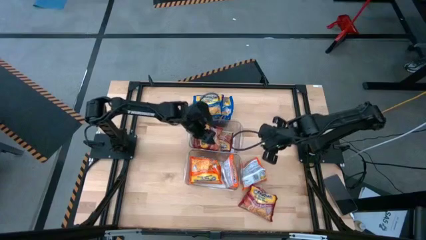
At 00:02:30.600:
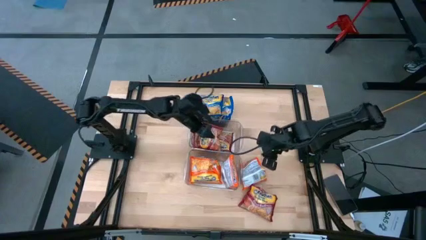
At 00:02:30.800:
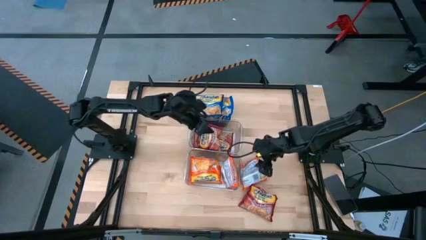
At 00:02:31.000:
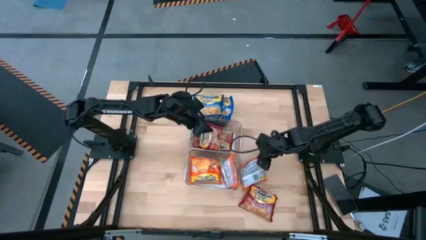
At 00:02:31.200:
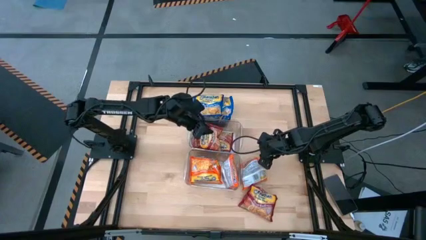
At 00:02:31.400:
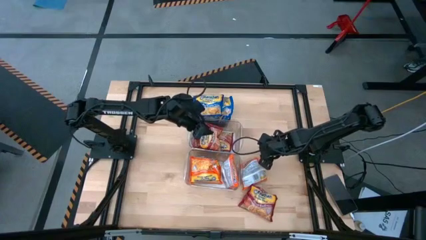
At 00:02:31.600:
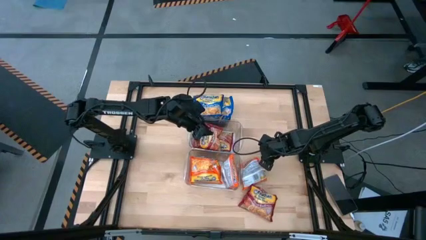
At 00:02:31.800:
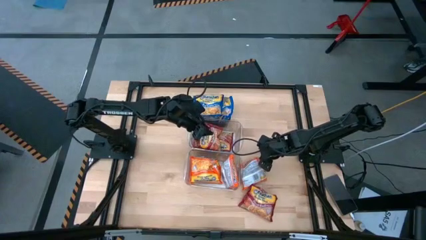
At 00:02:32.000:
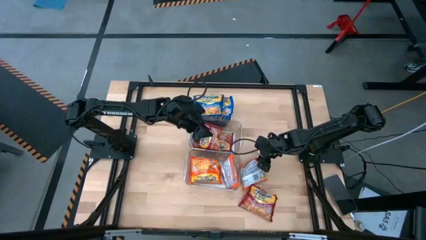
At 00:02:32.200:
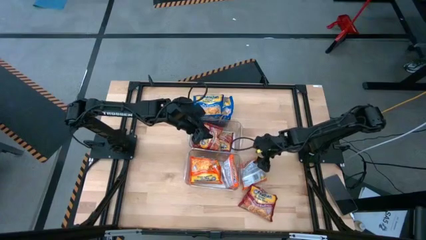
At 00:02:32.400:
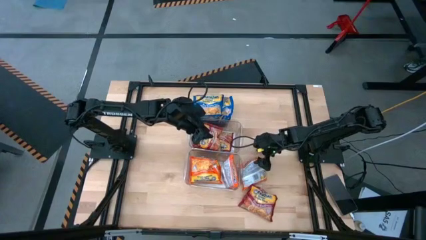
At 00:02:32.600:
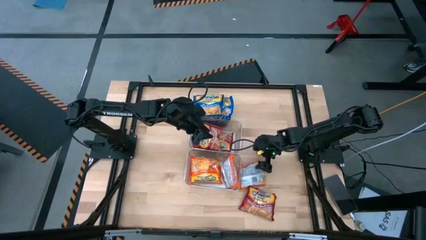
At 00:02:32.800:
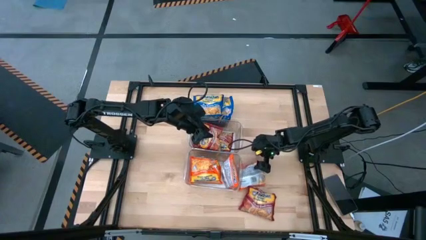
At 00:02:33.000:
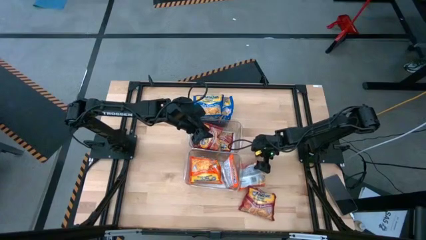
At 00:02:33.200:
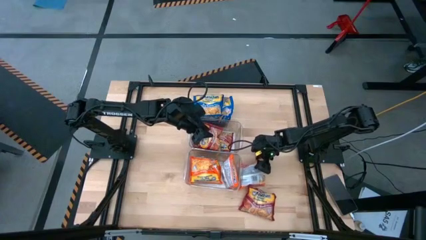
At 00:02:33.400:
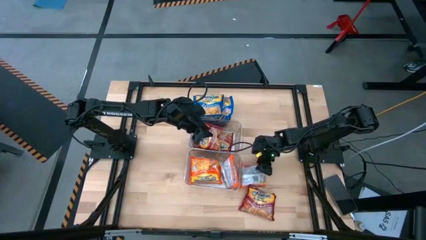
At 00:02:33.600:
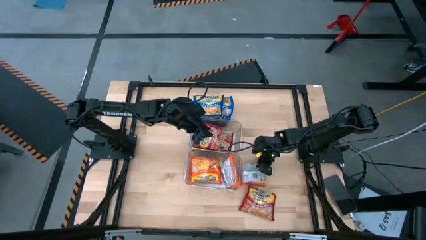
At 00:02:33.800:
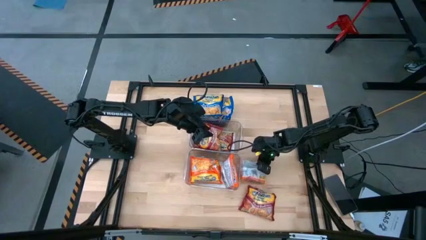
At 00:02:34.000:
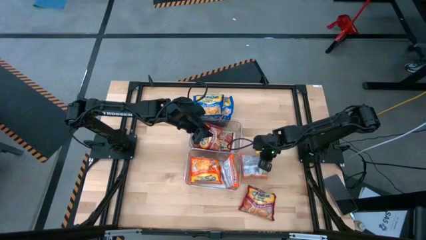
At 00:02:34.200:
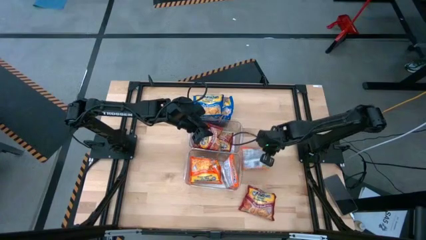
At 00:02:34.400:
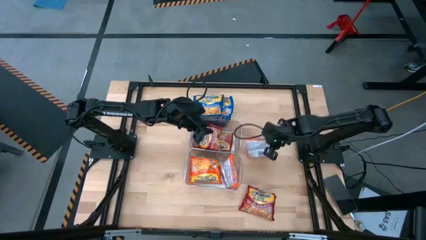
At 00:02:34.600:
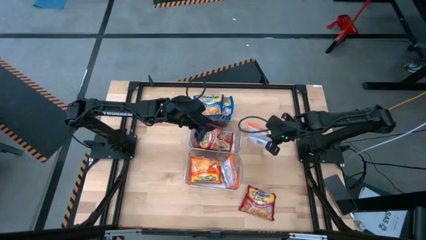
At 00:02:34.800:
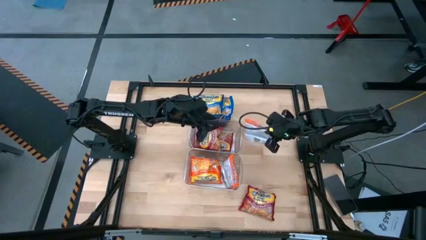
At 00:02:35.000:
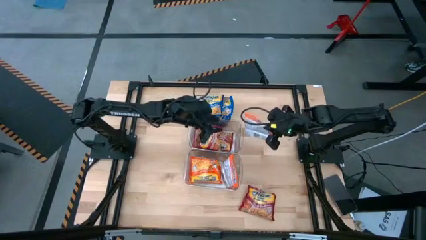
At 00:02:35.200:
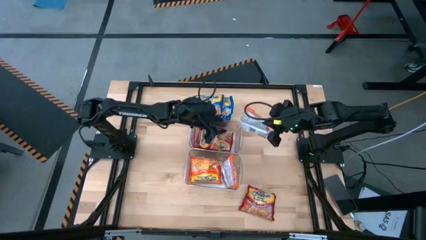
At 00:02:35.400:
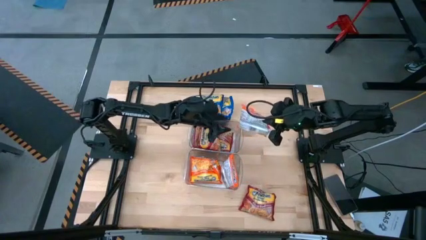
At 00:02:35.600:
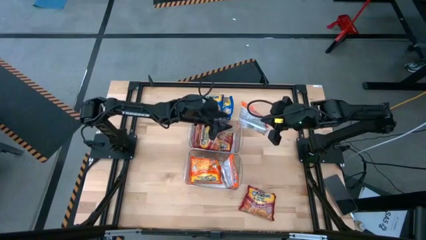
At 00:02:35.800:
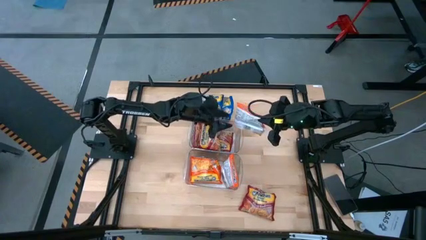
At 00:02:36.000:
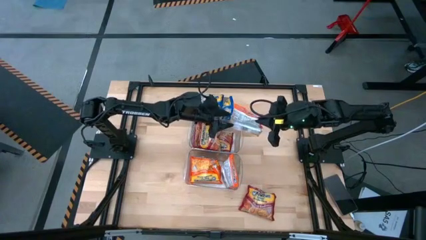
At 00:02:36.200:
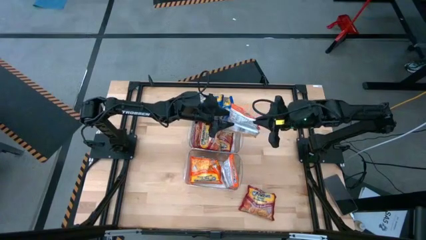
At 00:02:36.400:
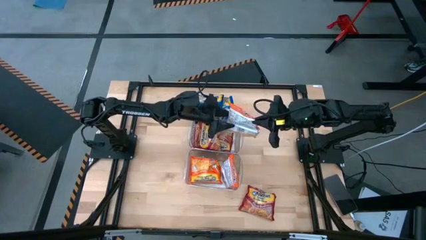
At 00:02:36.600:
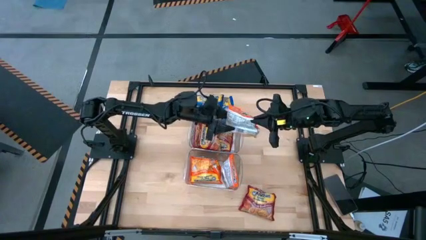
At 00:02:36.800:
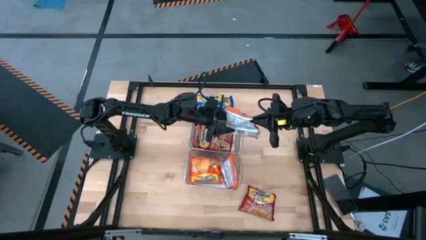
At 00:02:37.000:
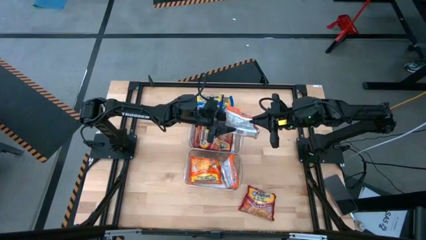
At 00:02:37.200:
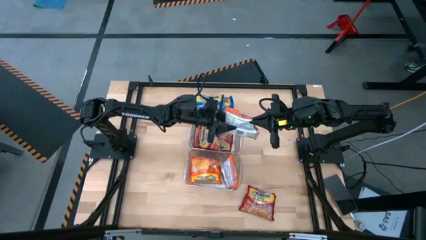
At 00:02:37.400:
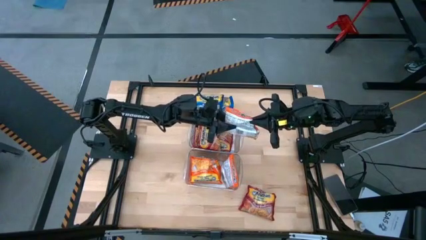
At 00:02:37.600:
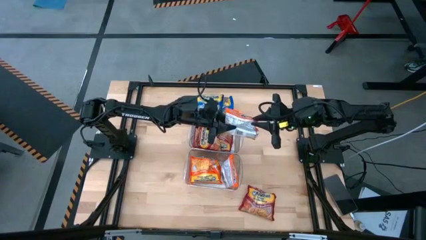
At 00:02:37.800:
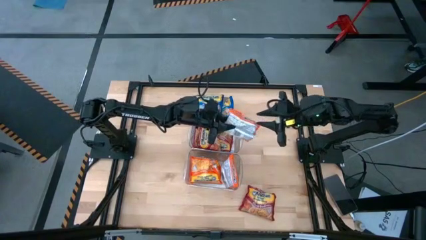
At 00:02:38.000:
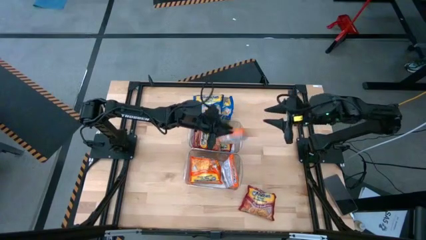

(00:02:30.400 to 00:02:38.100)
Task: Sort Maruchan noodles
Put the orange noodle pack into the bottom transparent bin
